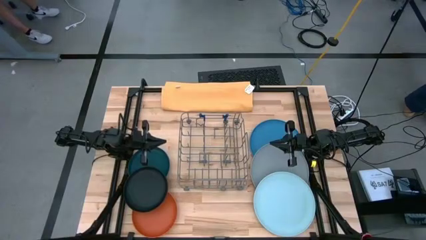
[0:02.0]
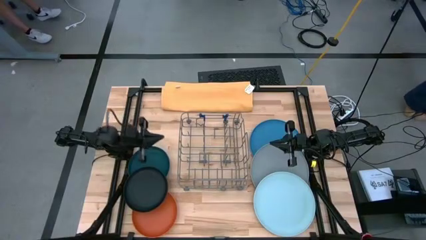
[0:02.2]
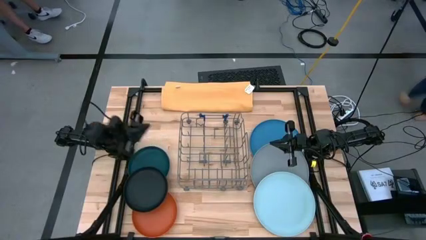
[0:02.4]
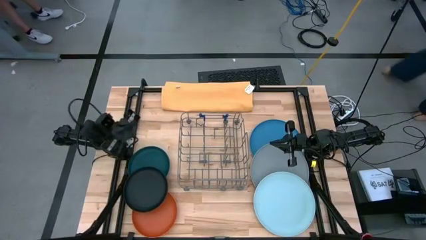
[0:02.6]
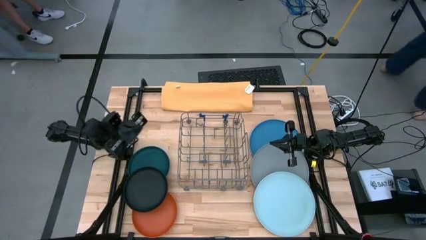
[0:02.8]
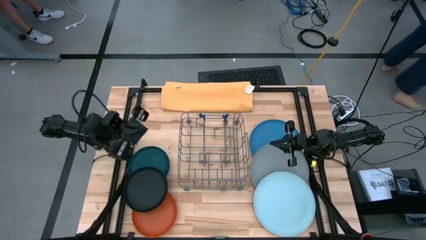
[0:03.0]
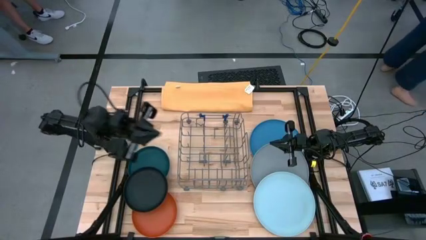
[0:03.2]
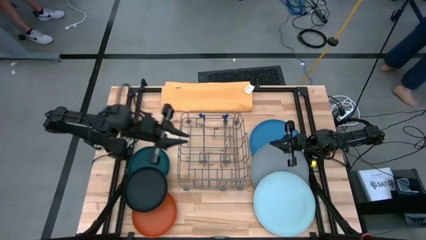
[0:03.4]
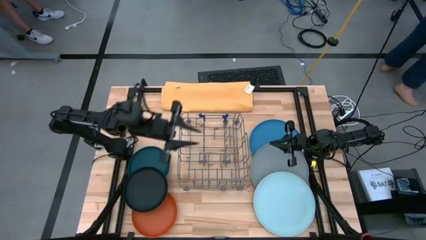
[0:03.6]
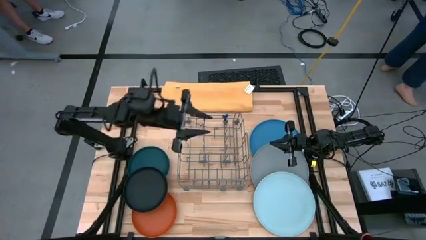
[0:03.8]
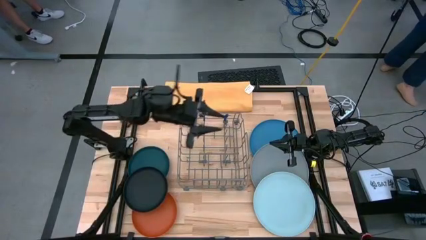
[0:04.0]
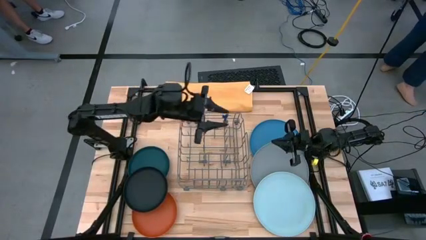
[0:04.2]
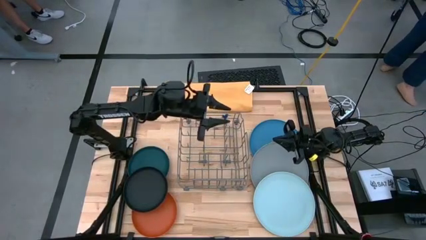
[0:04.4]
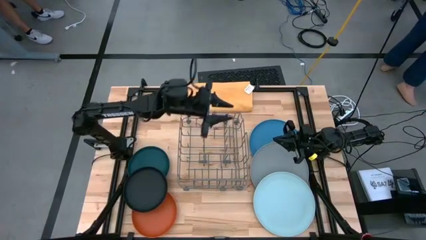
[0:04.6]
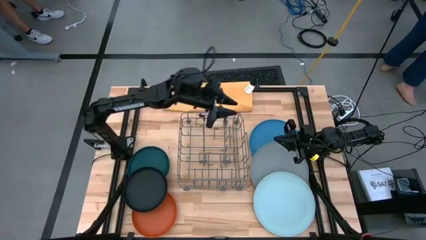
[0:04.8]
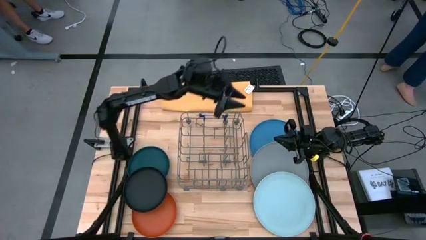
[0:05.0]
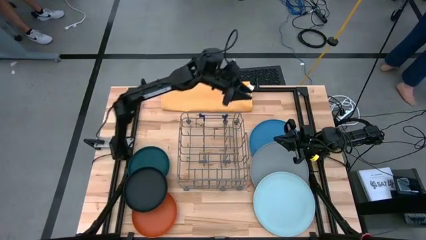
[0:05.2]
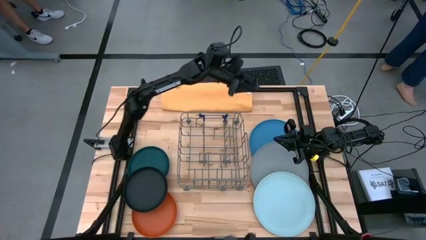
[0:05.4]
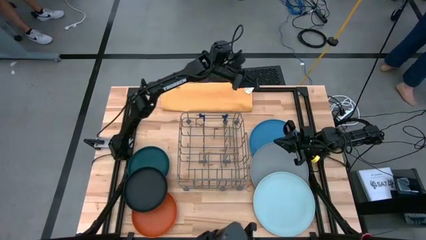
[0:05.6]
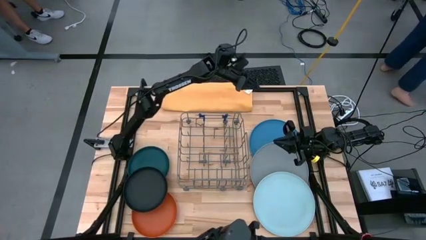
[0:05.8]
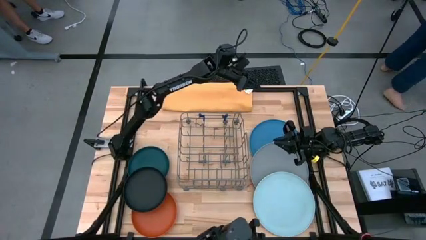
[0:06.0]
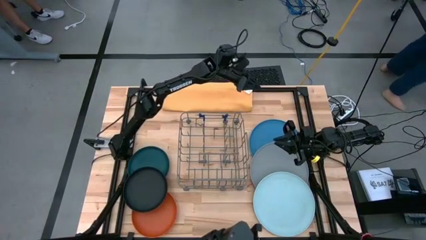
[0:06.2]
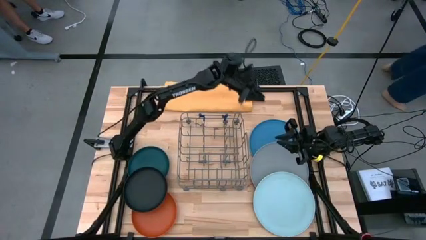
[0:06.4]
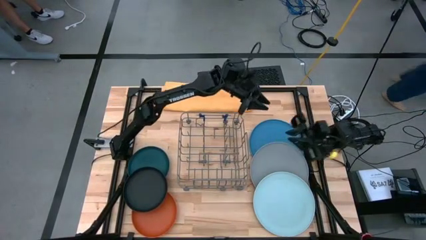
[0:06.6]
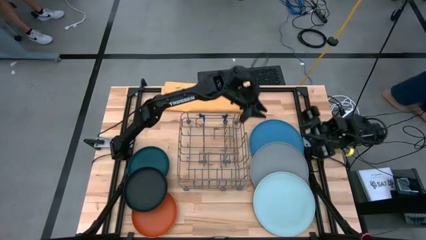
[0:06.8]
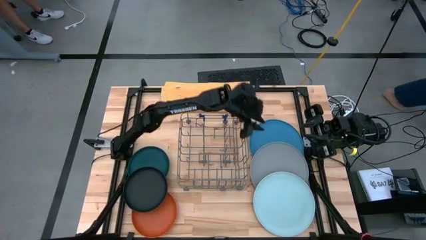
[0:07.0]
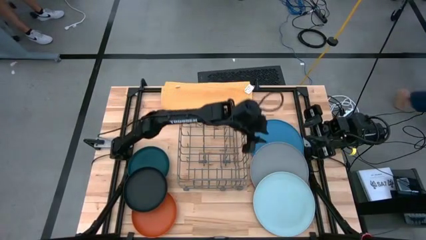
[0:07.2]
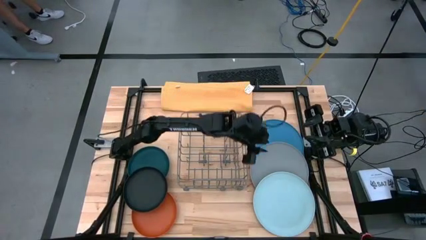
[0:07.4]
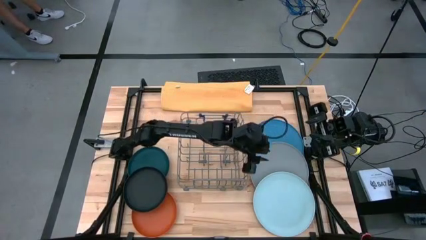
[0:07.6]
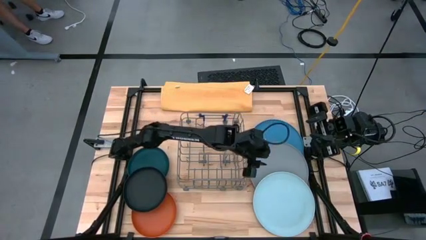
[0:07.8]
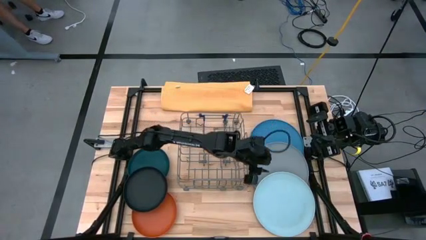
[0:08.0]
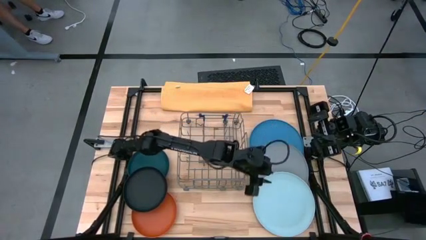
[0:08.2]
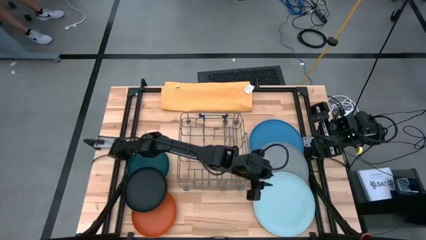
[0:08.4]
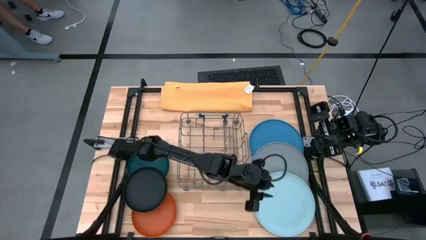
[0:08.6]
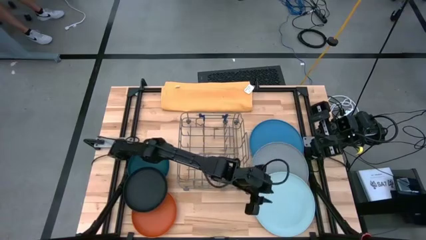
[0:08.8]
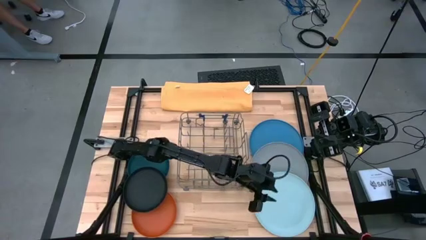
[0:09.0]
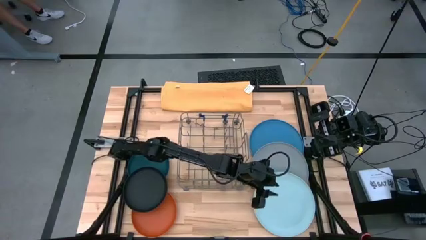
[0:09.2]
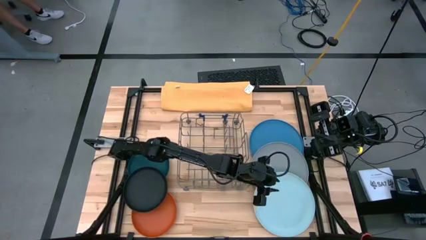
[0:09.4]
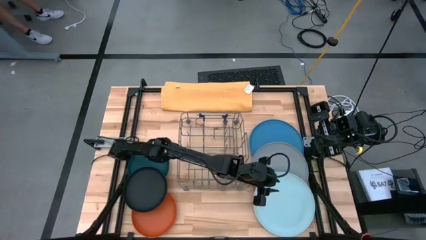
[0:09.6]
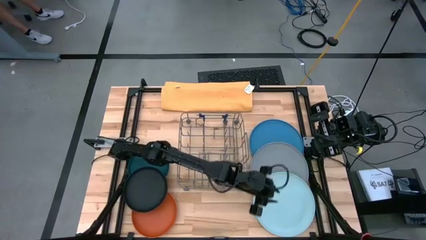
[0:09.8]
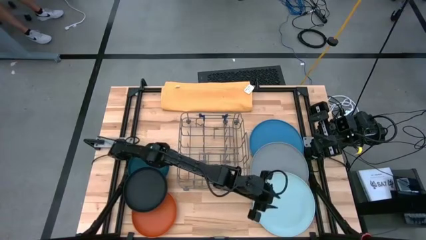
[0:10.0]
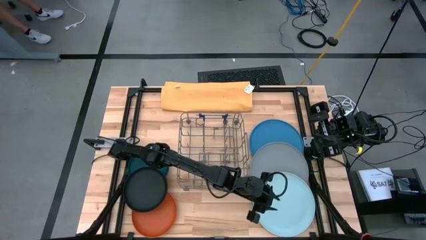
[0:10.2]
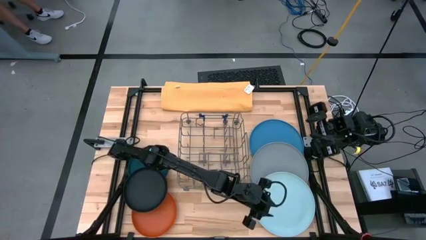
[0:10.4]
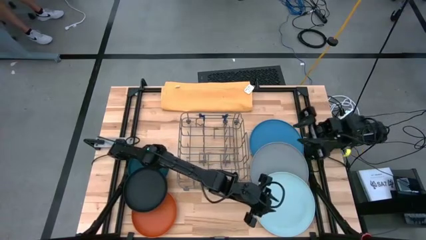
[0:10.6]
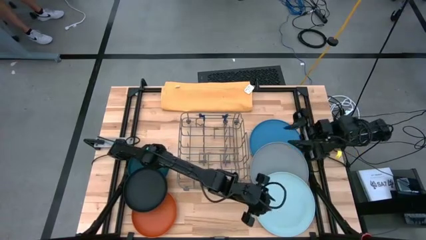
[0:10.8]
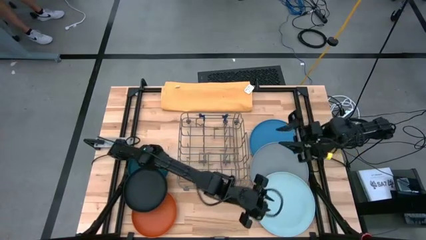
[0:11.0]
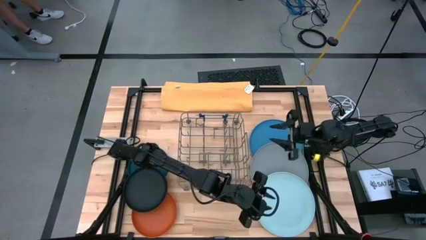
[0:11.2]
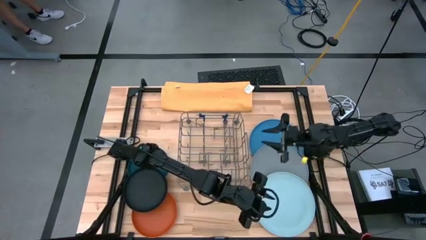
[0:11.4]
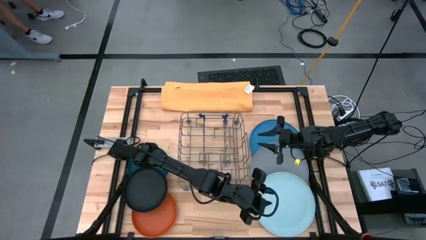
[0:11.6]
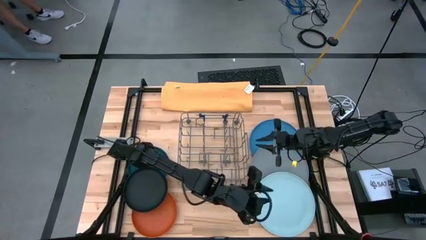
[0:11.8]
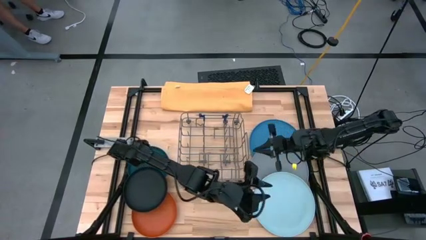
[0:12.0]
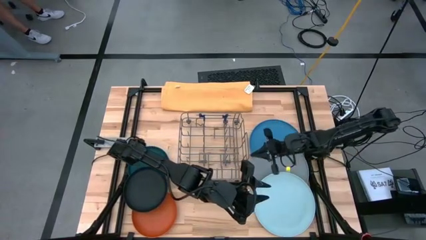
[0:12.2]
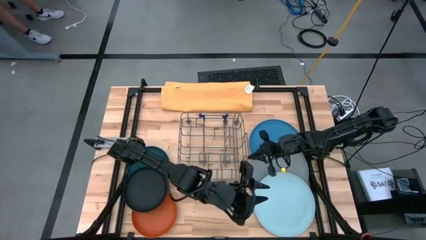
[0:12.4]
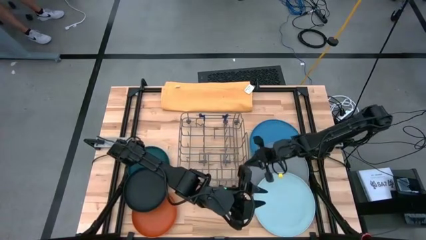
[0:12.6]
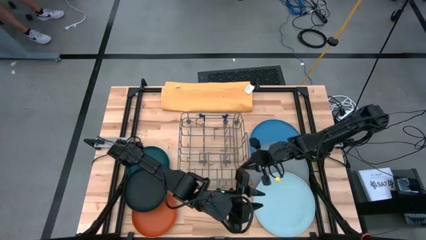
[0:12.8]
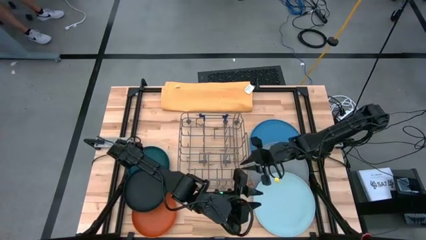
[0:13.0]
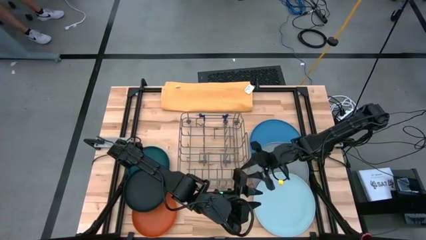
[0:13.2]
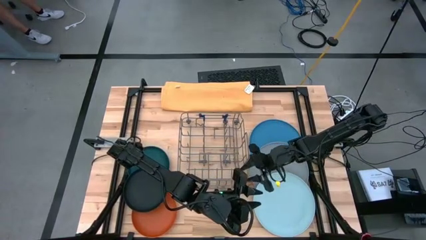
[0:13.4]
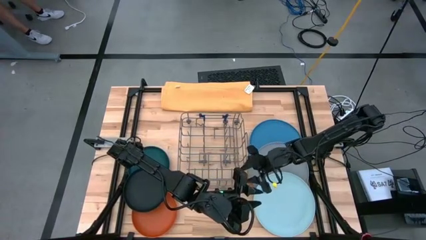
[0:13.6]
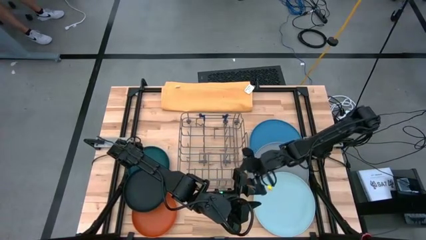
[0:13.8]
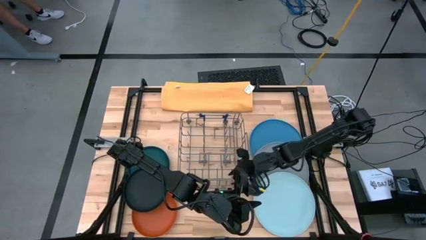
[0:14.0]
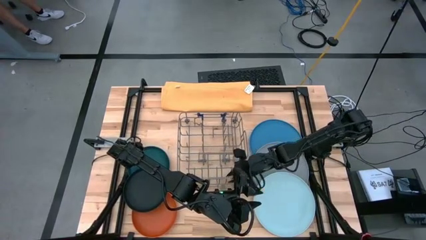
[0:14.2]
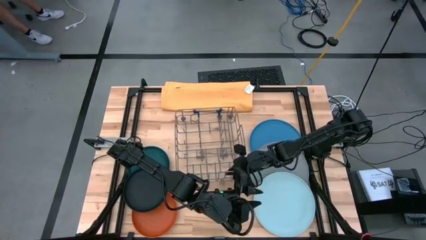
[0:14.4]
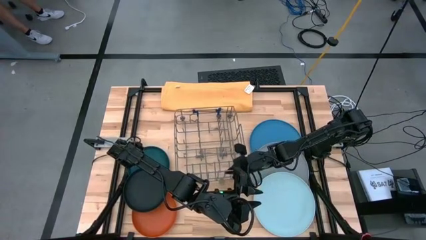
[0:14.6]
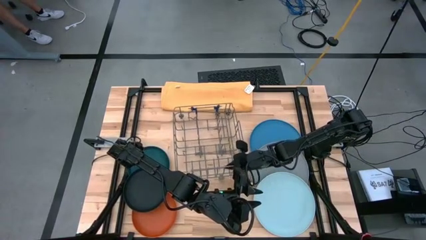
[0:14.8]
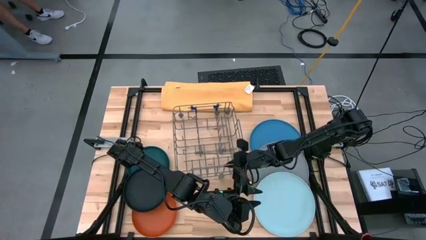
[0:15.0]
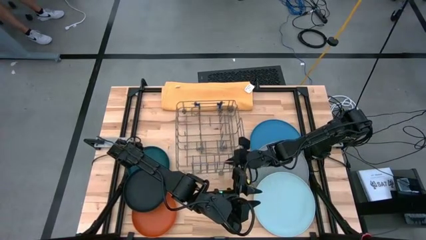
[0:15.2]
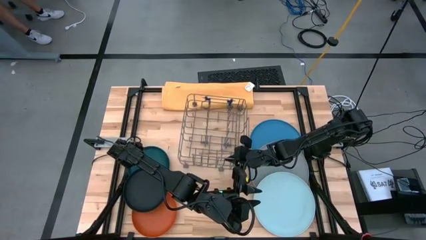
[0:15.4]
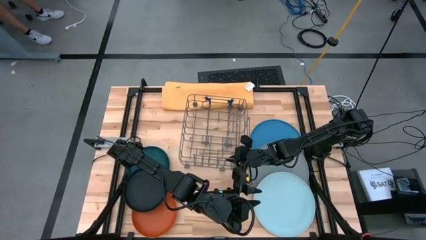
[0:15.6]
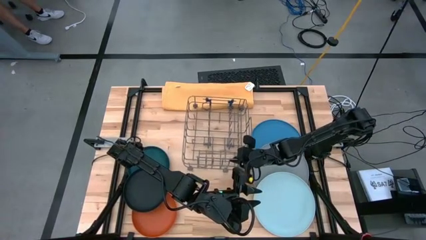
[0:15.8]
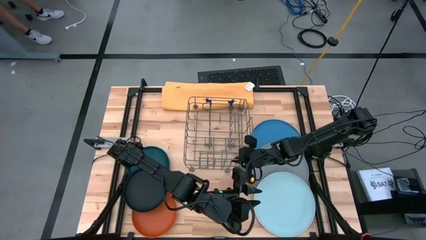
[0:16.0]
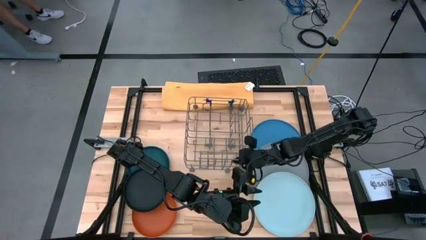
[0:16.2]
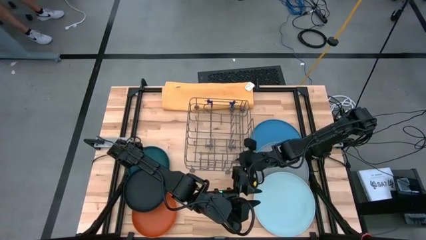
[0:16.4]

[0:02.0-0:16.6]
Task: Sort dishes
Adjust the dish rack to the center
